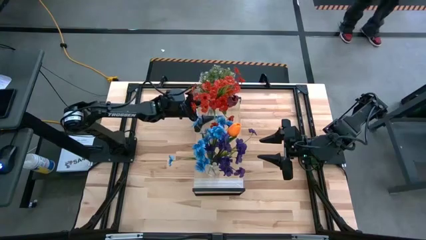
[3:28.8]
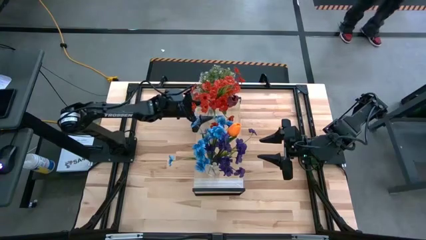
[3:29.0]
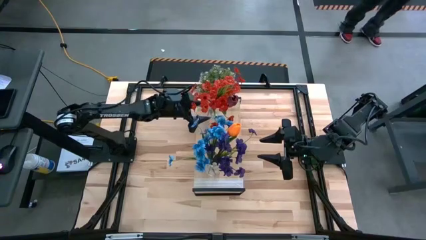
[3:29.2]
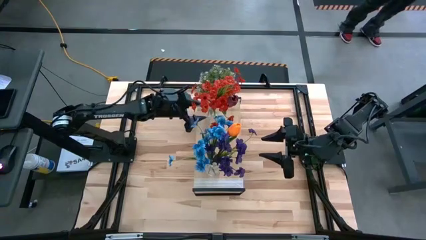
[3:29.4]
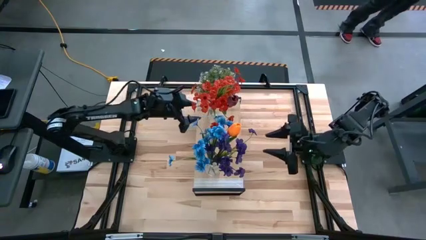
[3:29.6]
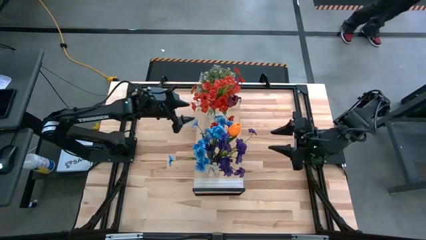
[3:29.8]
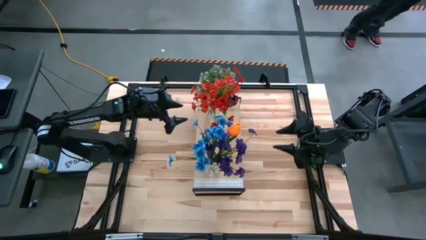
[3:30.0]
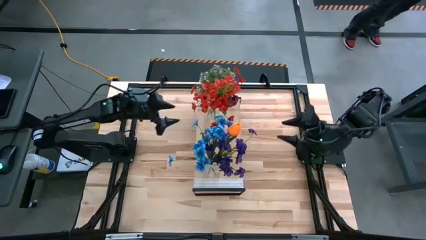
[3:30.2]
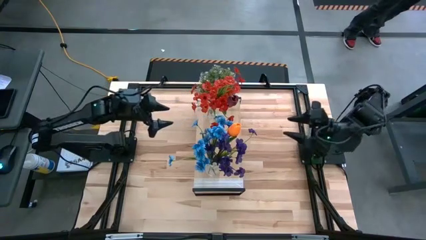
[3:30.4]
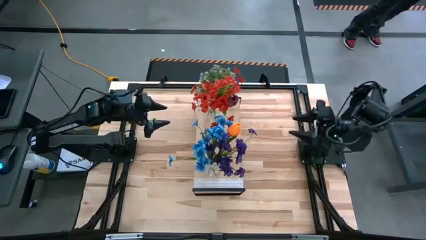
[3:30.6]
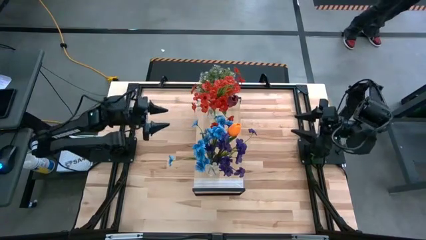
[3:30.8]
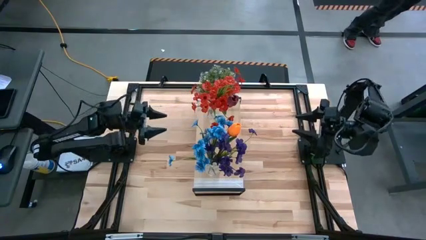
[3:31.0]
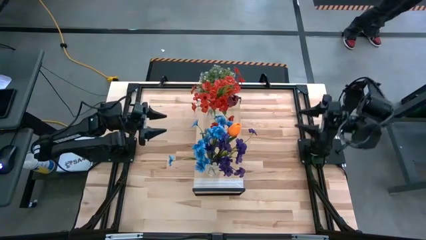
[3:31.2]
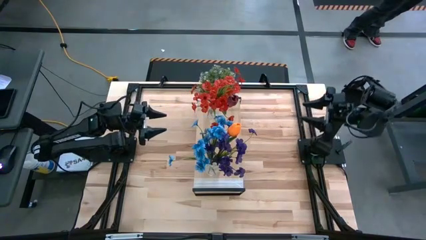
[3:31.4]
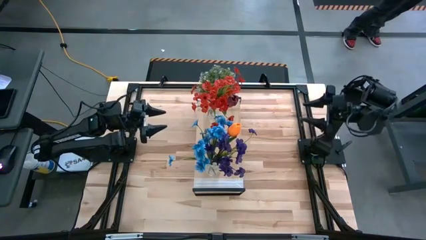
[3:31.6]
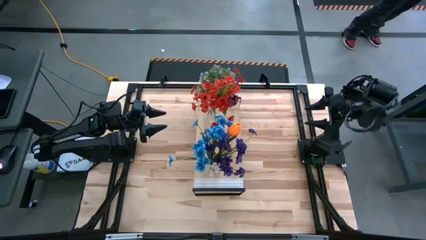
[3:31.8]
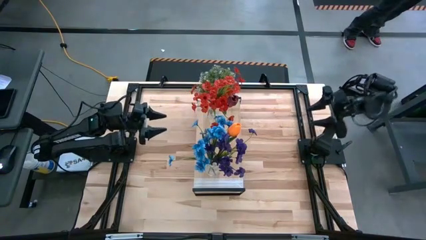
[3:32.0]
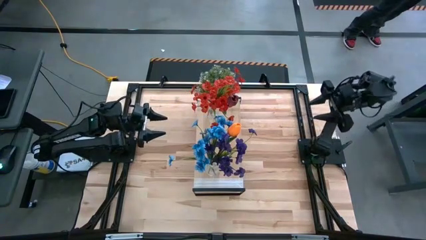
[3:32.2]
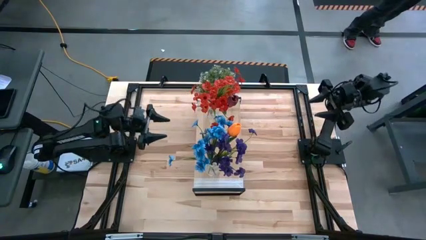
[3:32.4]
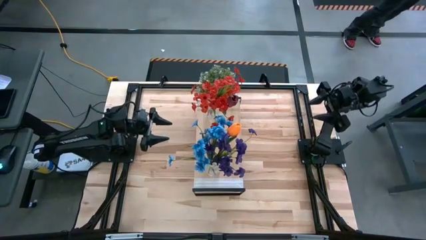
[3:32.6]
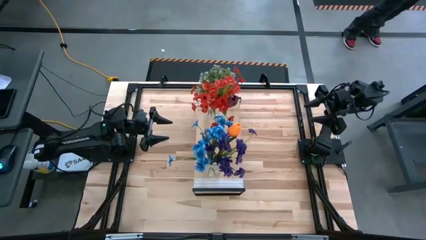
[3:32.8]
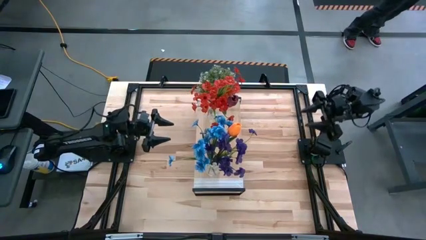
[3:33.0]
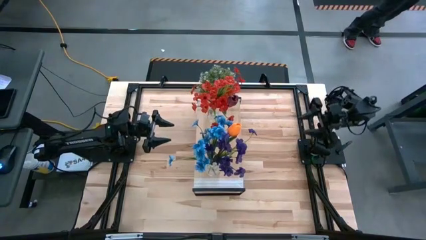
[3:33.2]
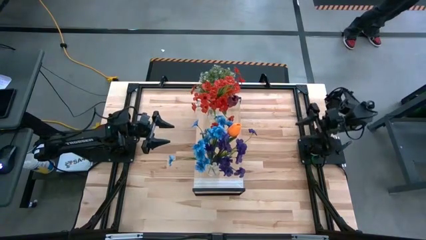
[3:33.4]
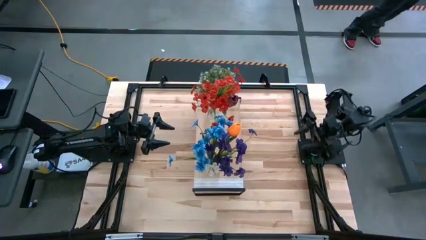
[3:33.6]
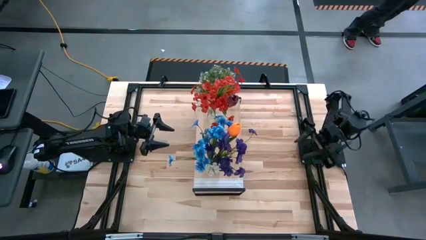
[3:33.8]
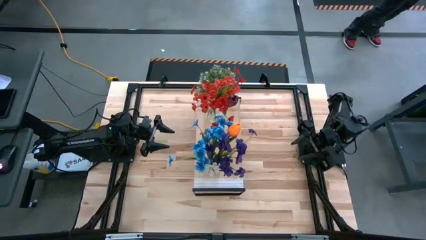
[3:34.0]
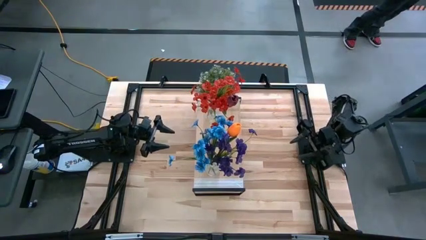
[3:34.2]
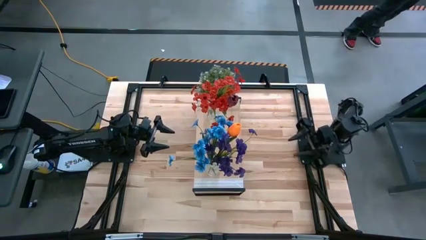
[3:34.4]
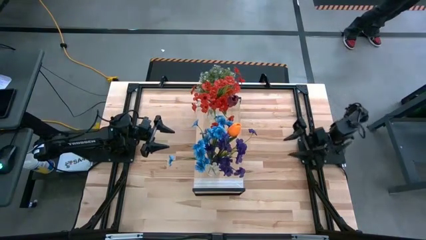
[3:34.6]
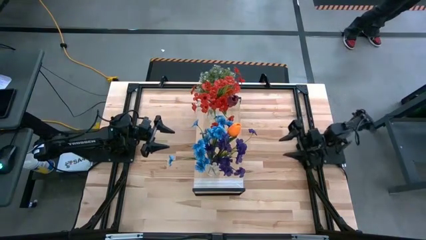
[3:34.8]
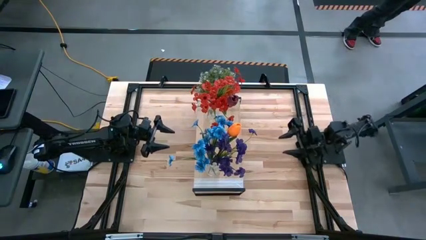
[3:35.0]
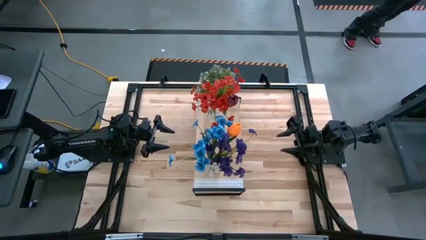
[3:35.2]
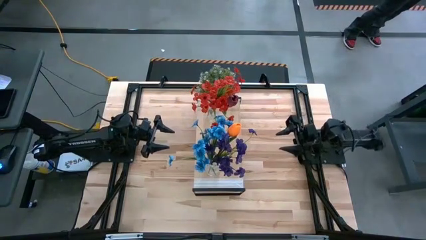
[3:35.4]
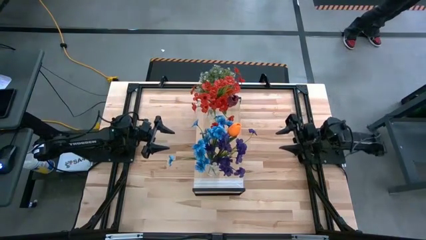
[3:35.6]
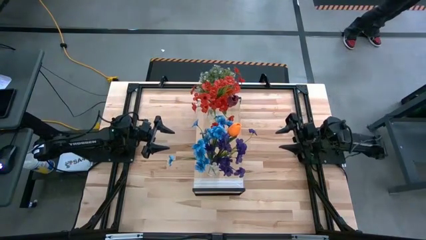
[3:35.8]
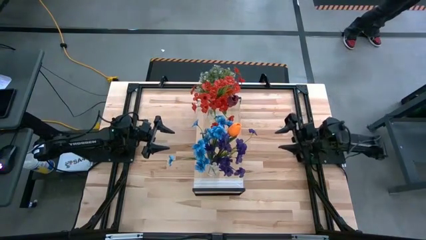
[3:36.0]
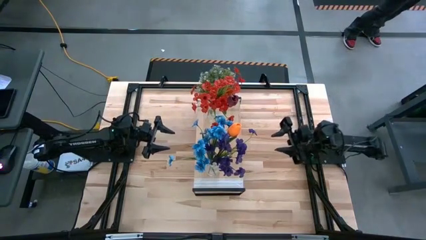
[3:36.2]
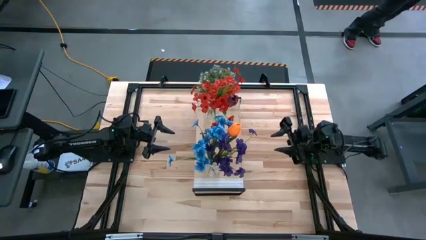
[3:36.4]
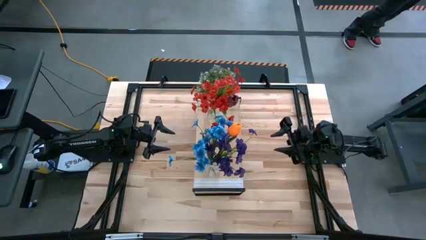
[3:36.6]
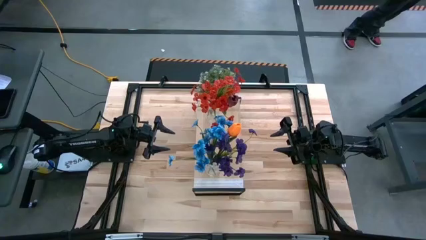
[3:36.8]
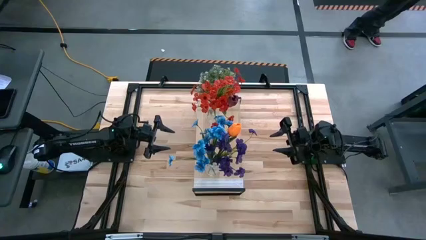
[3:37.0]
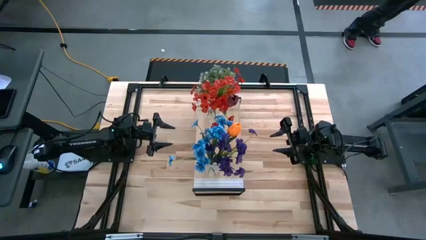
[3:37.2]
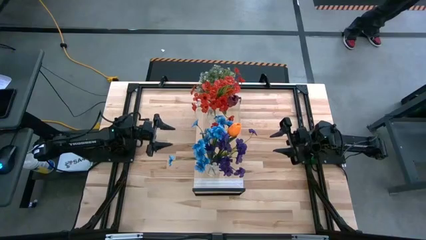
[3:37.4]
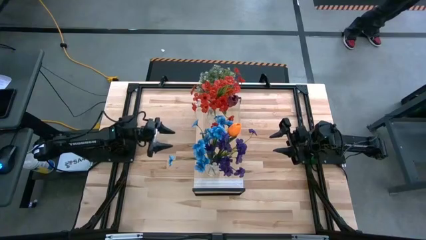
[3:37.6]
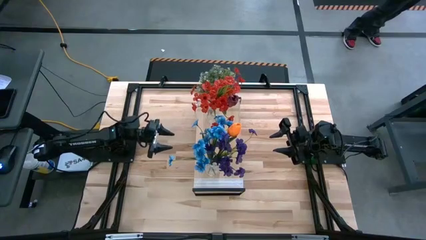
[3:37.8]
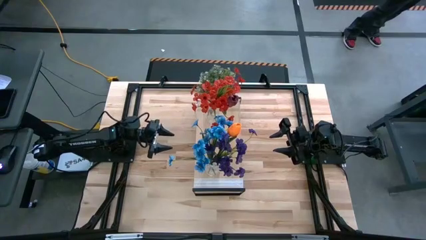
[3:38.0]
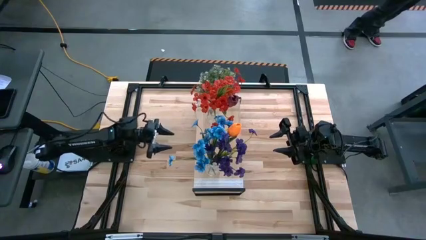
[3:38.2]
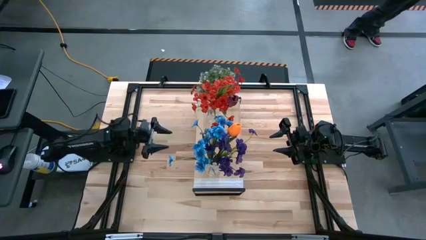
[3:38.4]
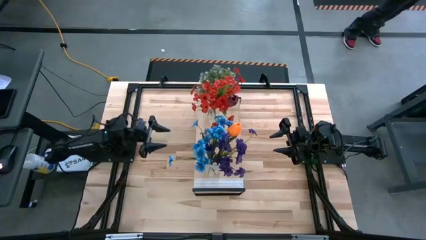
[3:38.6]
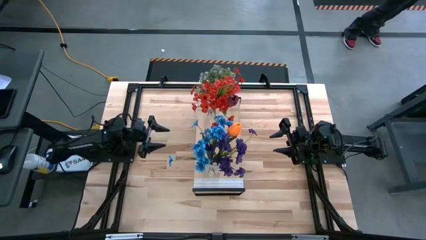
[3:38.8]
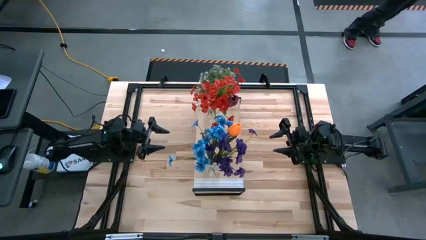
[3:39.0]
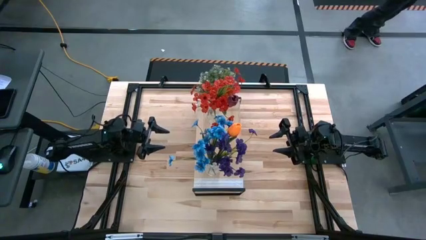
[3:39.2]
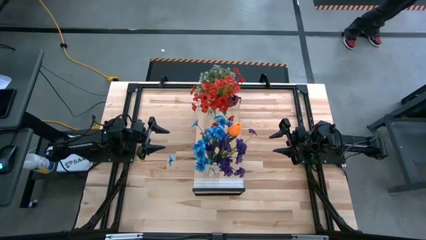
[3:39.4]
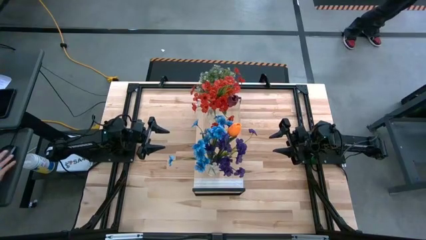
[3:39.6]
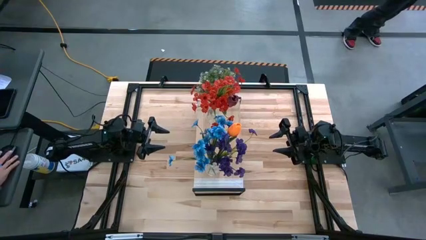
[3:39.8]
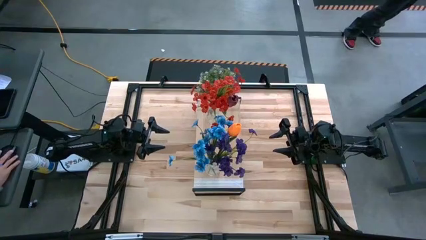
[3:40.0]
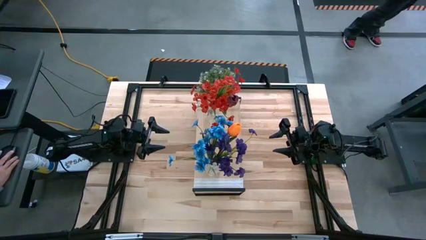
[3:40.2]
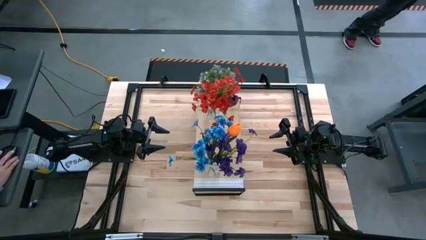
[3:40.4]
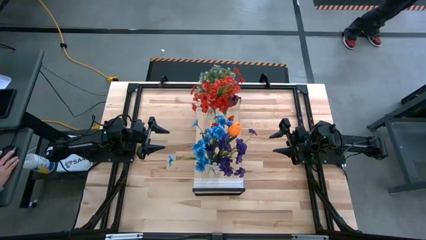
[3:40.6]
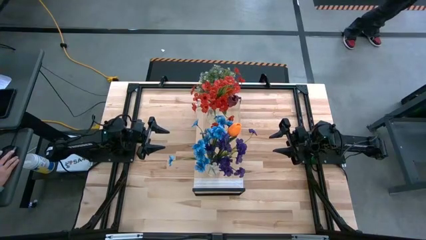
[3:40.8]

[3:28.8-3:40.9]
Task: Pick and place flowers into a vace then onto a shelf
Return to Home Position

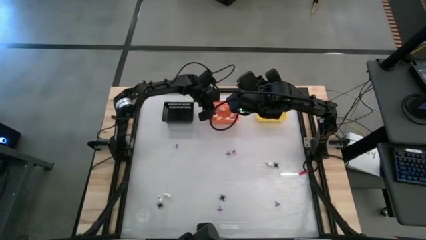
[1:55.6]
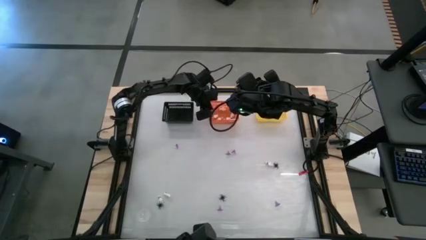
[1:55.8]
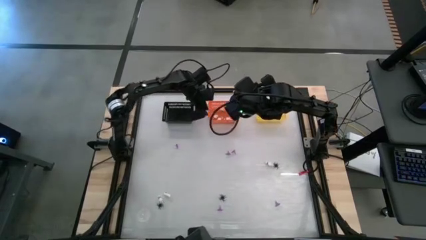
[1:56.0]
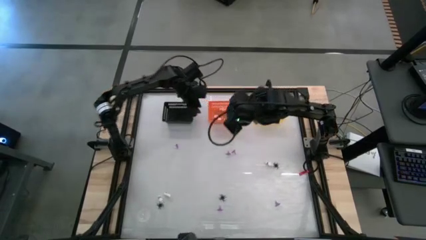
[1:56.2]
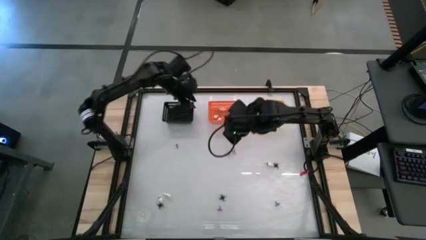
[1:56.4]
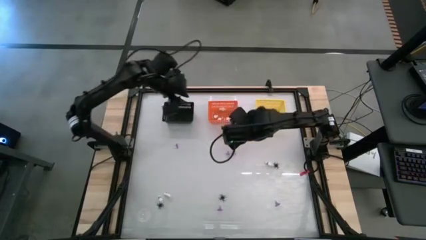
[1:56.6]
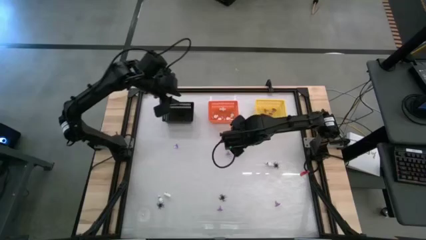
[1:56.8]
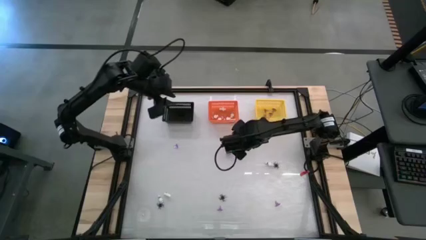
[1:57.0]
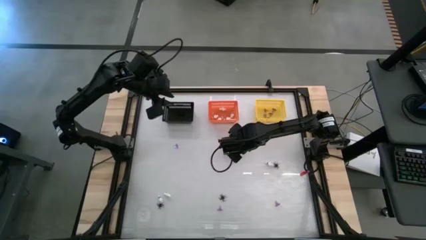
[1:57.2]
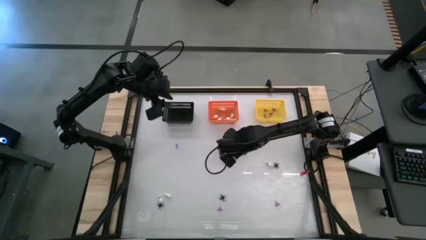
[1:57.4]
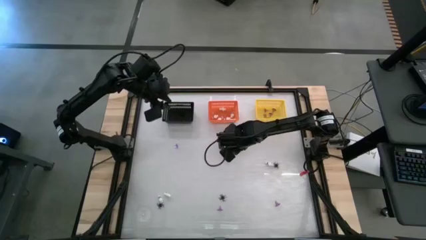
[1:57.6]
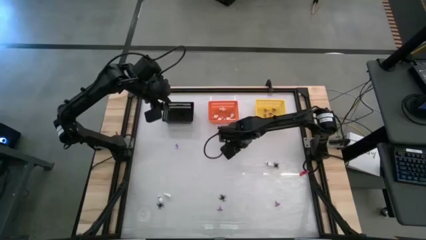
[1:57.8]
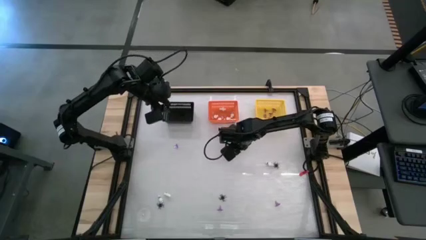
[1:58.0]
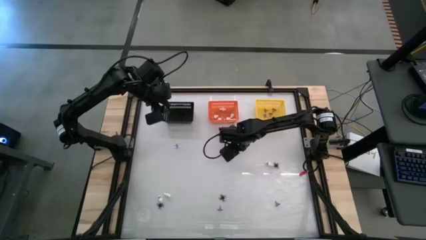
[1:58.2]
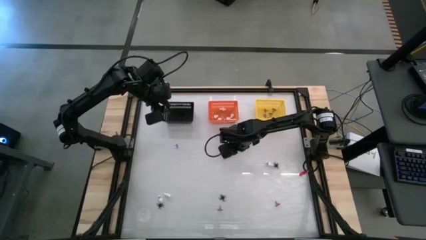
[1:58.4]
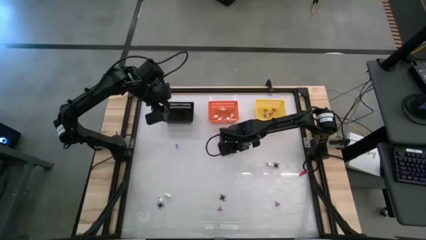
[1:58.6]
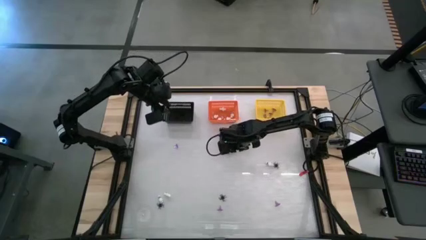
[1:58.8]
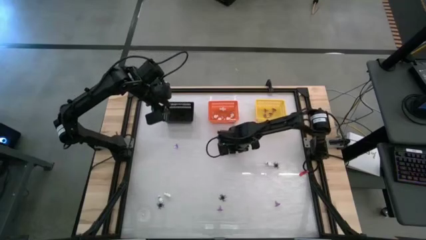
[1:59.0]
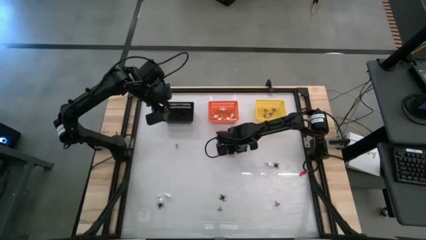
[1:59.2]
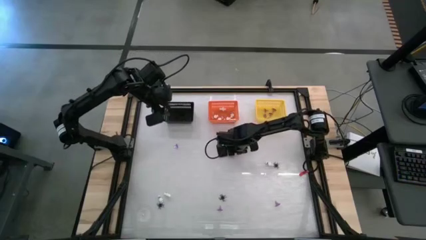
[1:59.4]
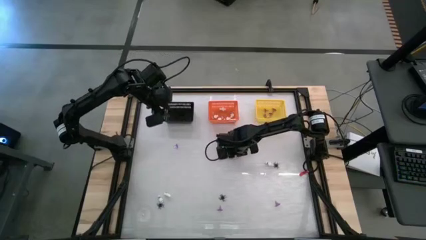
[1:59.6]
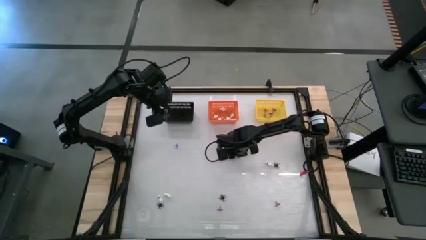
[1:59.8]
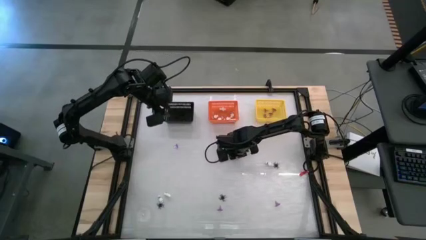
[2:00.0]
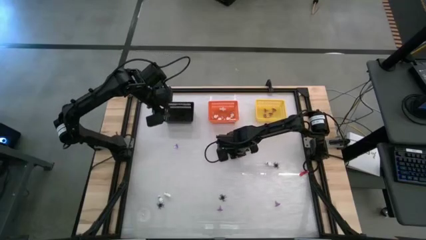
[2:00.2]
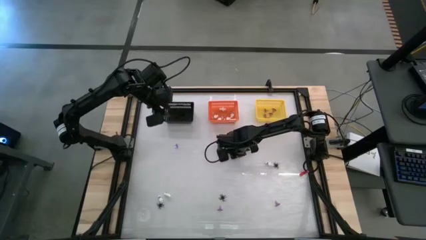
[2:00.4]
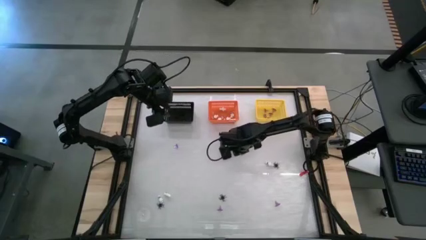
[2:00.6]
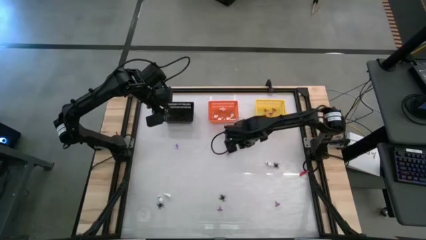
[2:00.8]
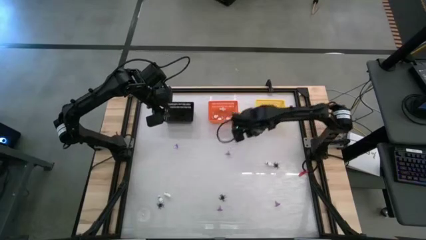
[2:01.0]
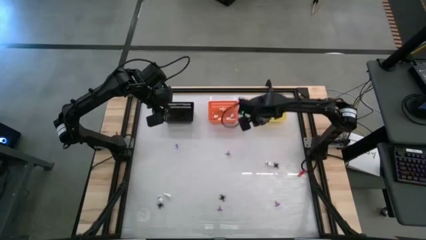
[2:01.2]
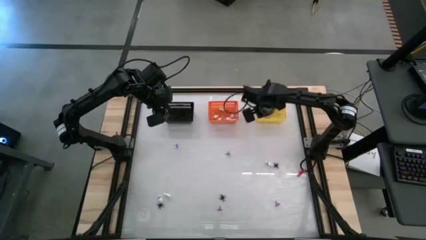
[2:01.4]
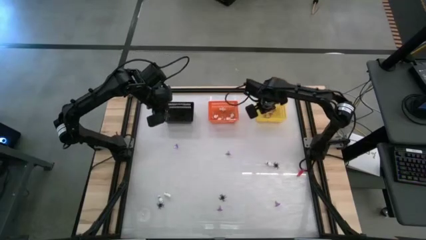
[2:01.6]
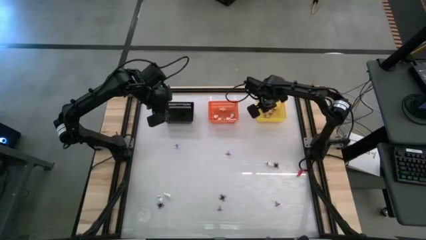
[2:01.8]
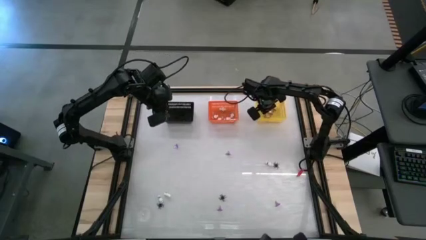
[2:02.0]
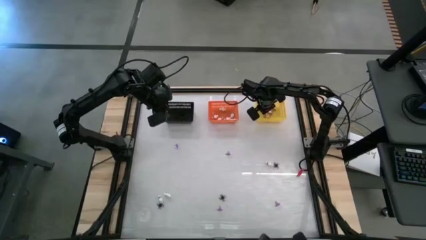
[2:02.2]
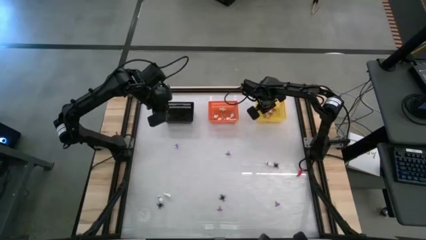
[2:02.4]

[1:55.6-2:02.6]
Task: Sort Halloween decoration
Put the witch hat toy into the yellow bin
